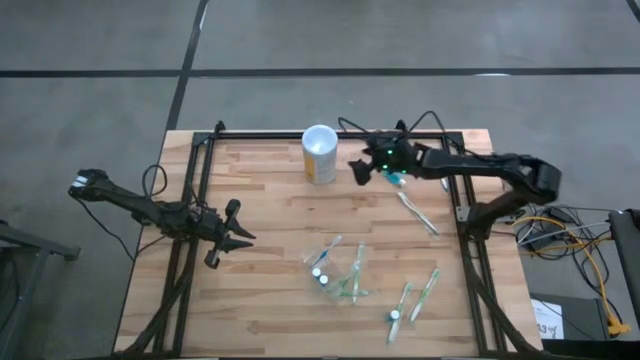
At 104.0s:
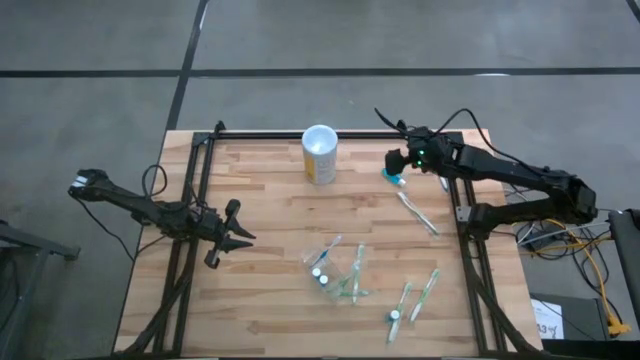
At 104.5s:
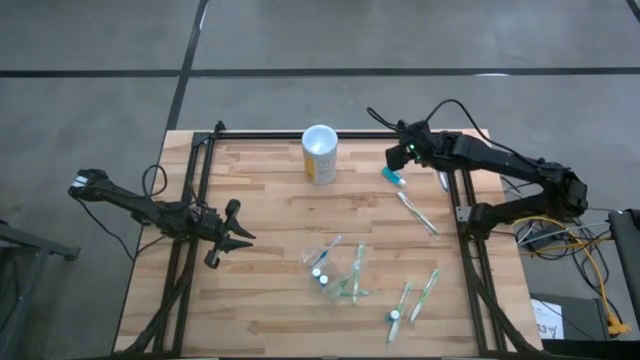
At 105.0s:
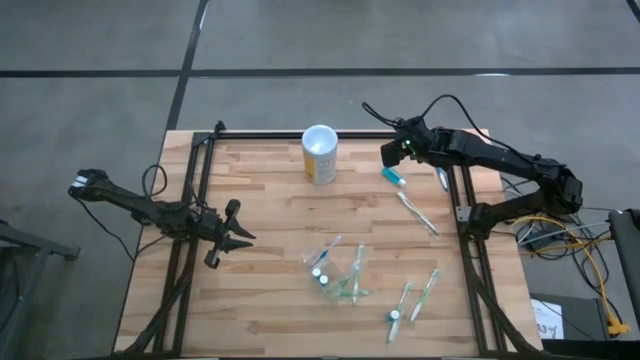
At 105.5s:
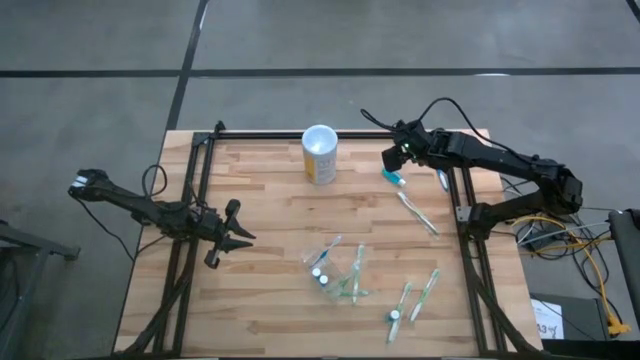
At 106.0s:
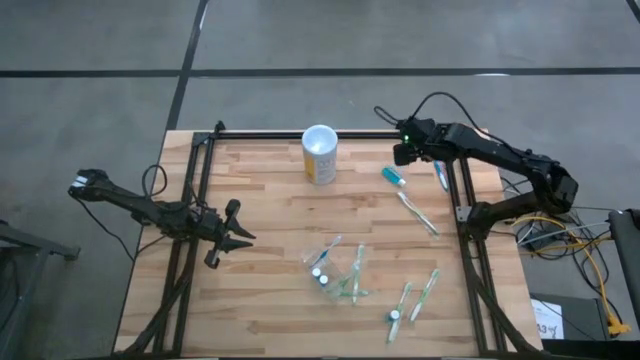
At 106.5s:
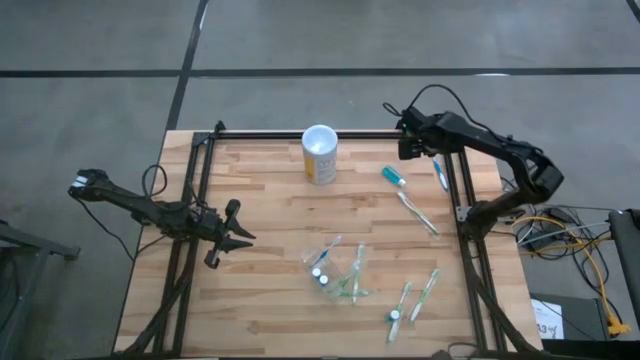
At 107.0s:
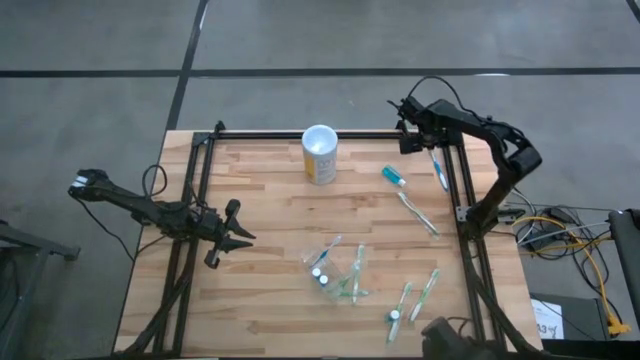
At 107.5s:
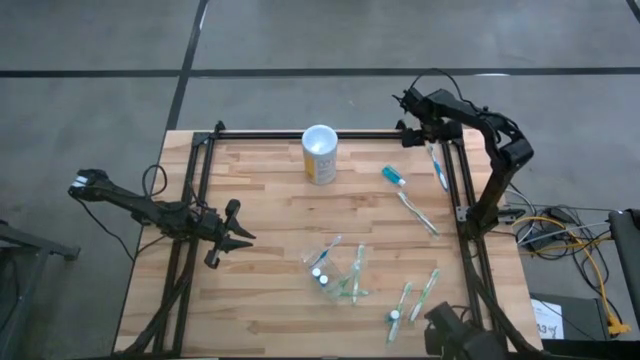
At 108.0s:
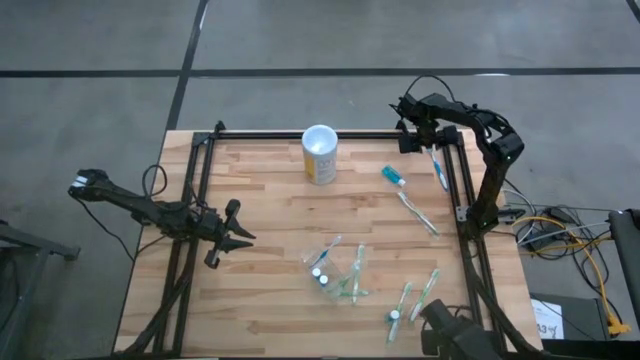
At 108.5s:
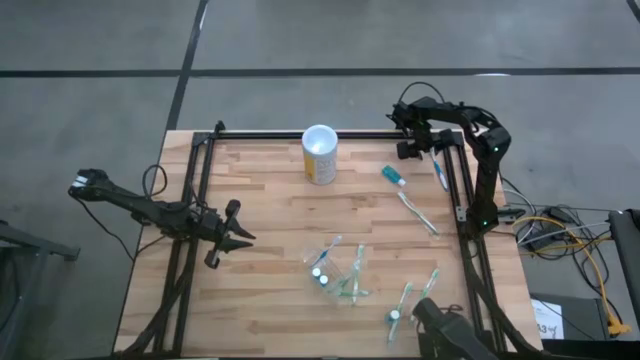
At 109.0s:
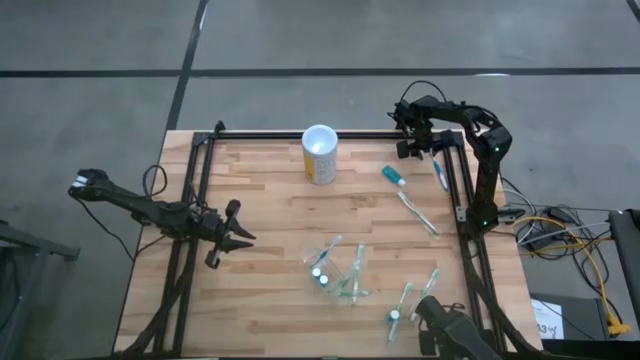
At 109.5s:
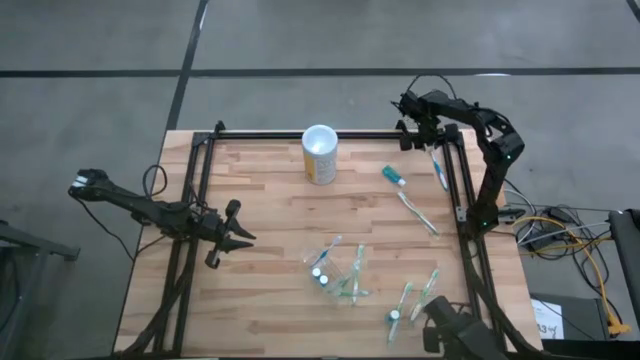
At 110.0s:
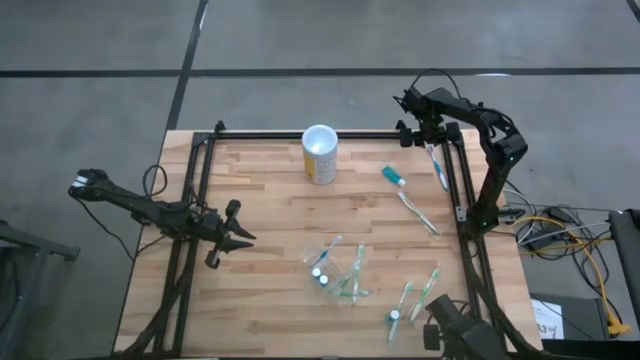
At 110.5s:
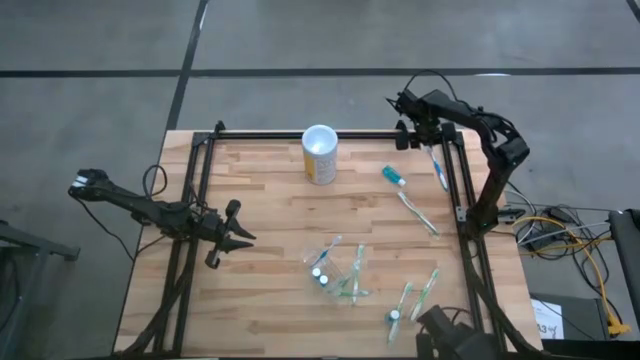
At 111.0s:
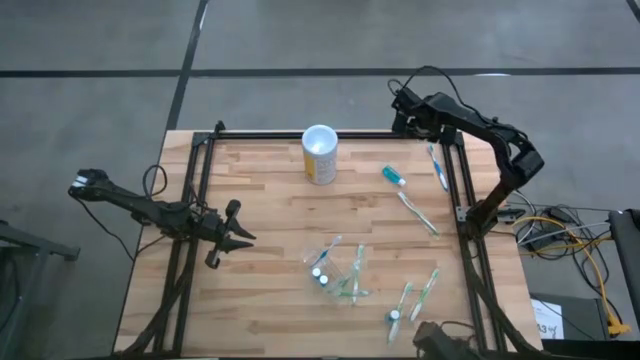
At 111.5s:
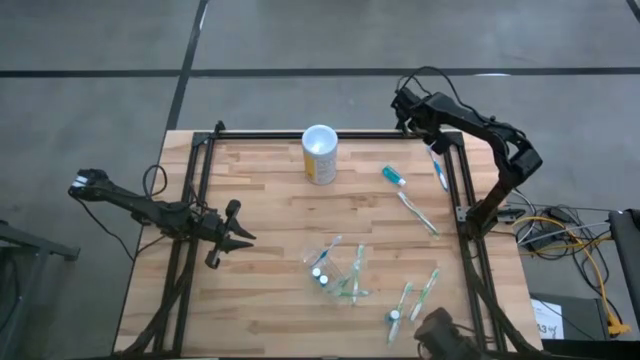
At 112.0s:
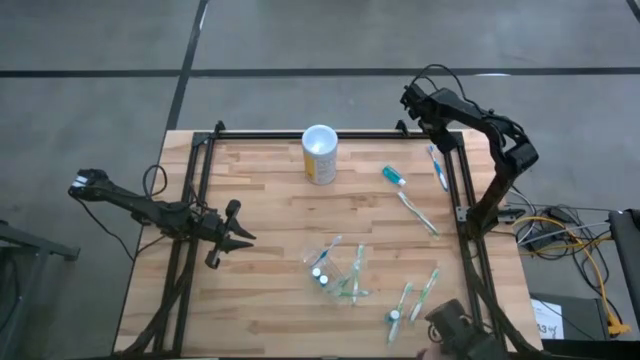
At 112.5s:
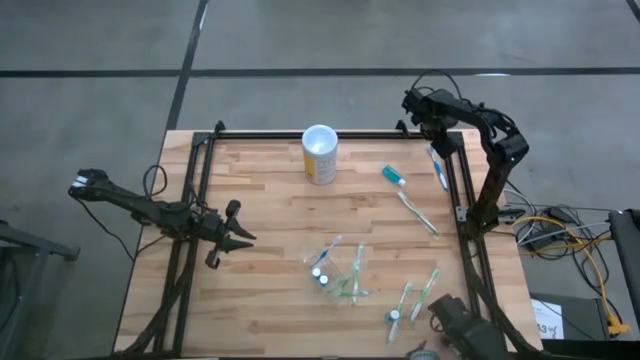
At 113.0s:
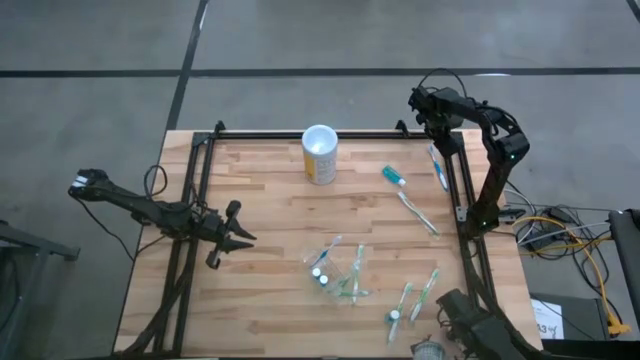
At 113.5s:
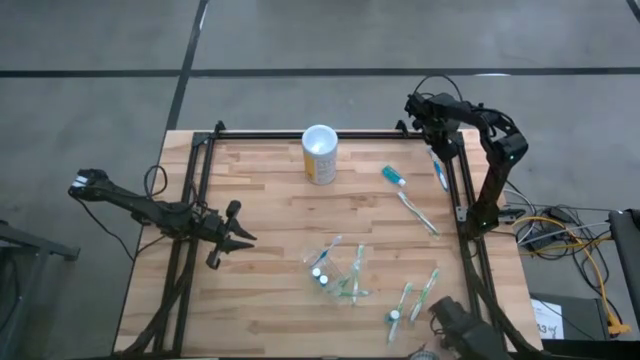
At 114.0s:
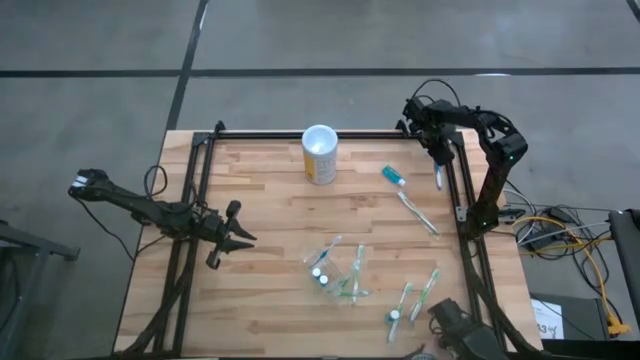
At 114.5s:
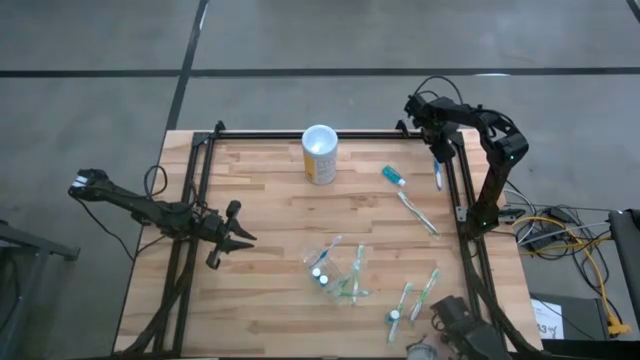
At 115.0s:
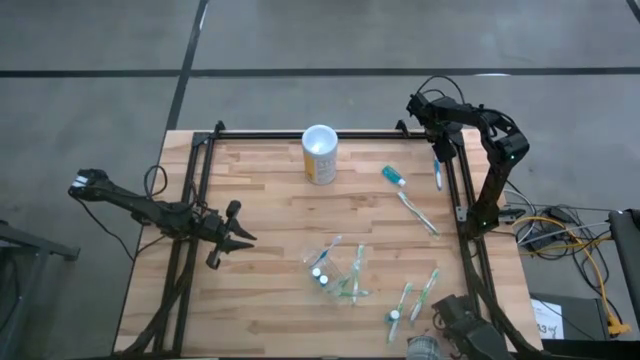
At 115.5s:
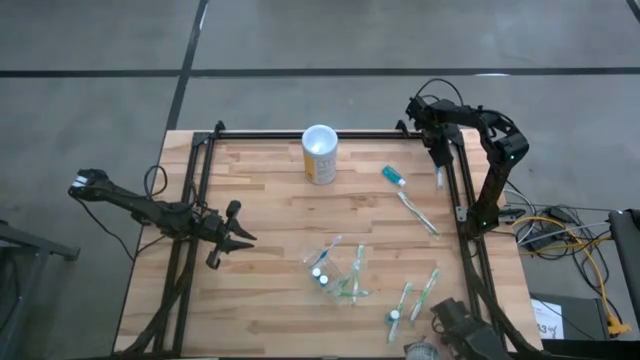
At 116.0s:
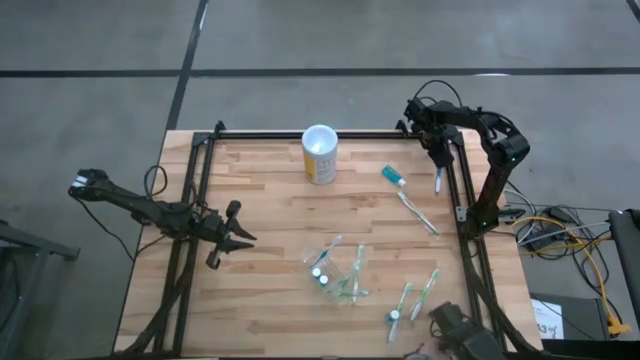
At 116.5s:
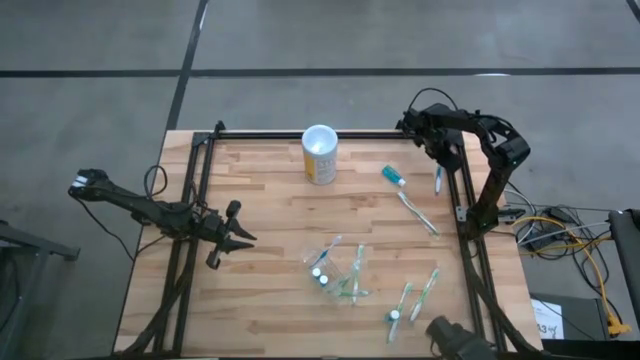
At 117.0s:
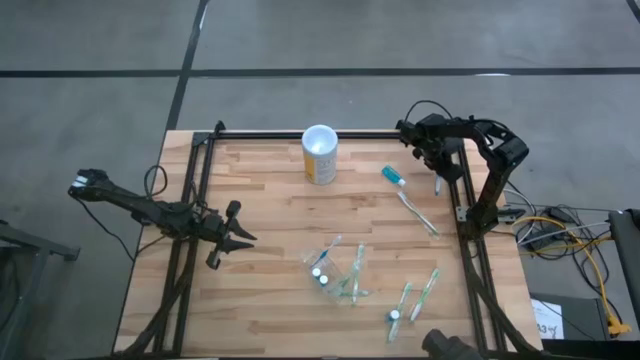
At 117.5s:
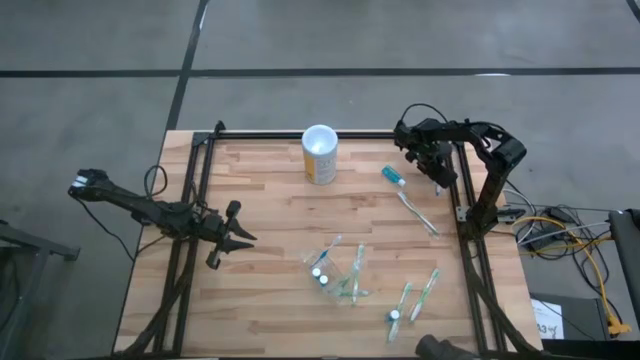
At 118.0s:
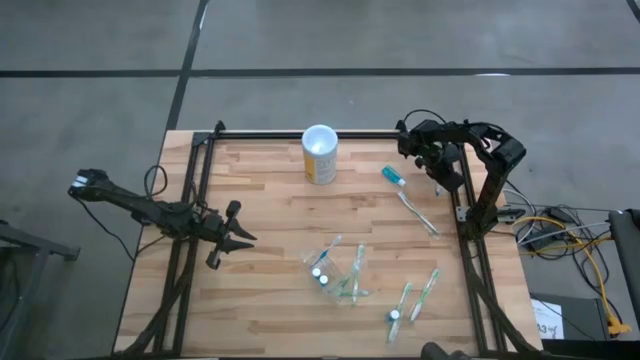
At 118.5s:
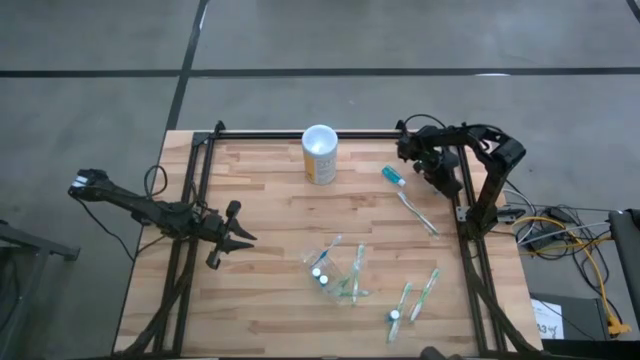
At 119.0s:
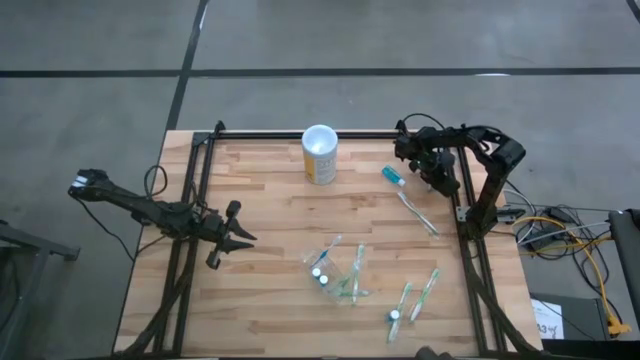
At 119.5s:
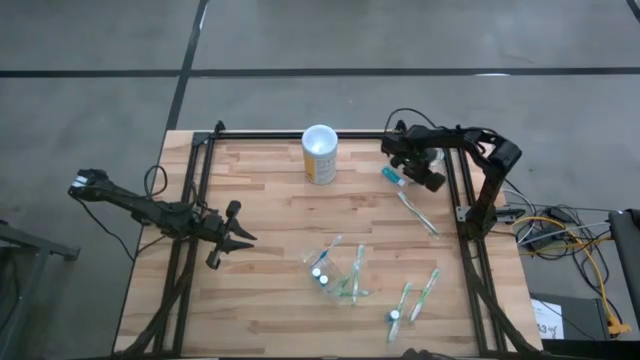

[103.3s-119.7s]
Task: Pick & Place toothbrushing station
Put the blue toothbrush into the left section of the transparent organizer

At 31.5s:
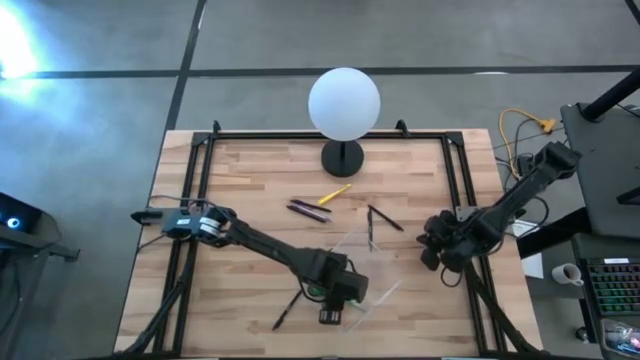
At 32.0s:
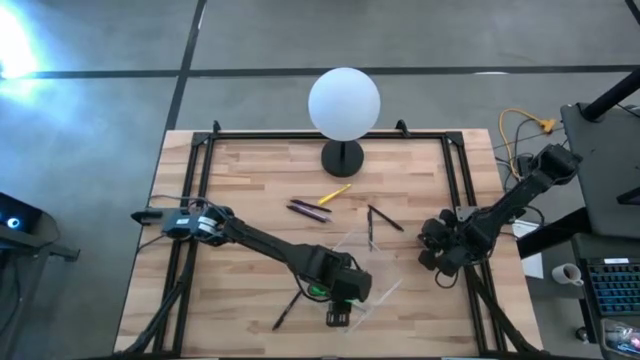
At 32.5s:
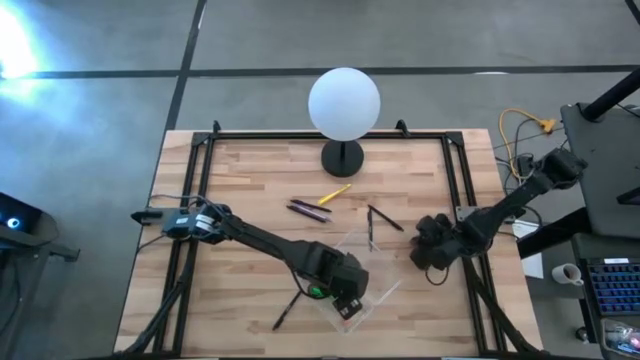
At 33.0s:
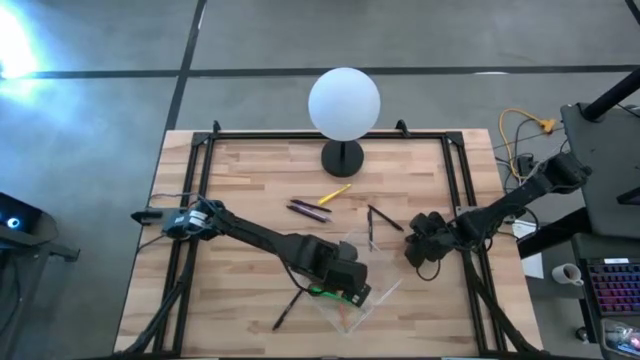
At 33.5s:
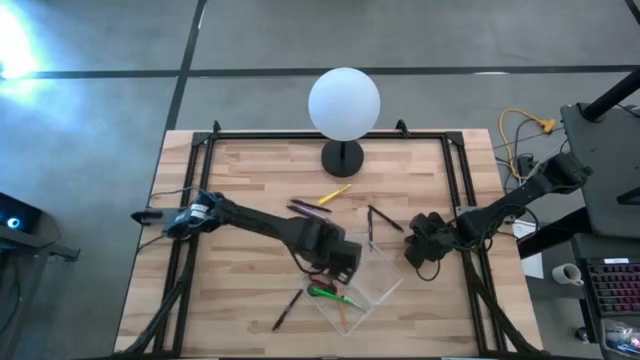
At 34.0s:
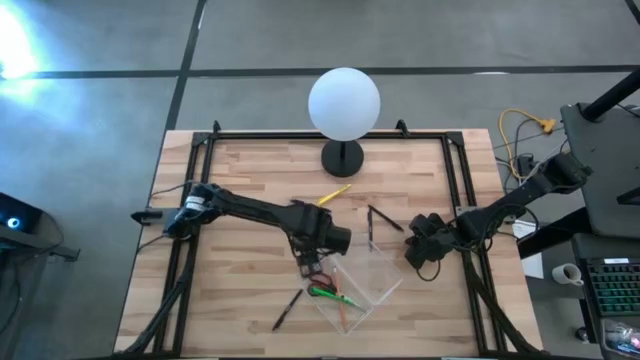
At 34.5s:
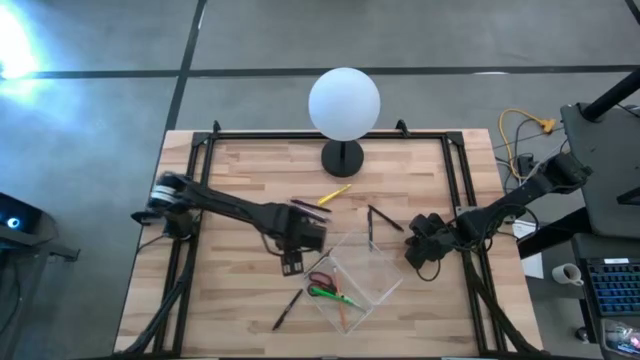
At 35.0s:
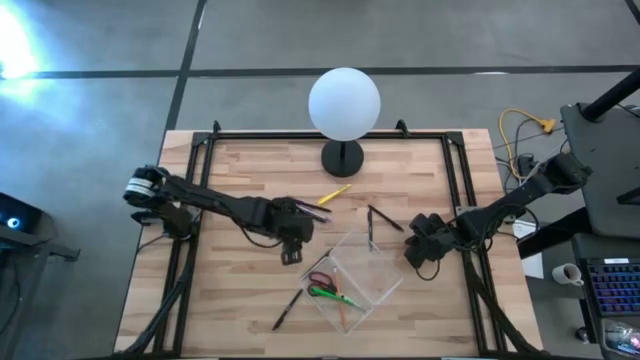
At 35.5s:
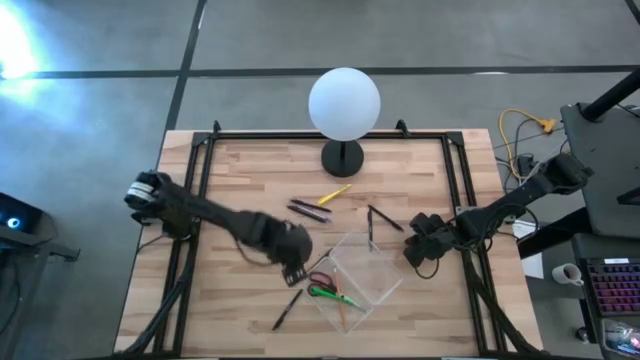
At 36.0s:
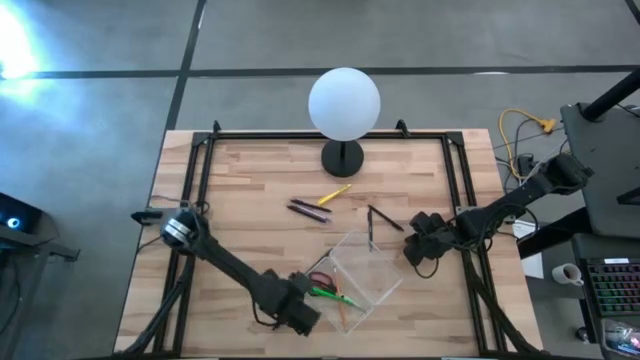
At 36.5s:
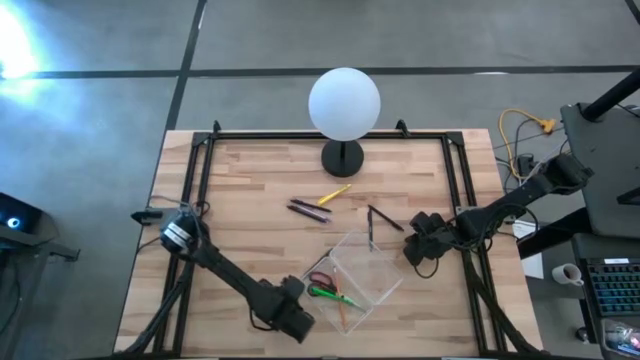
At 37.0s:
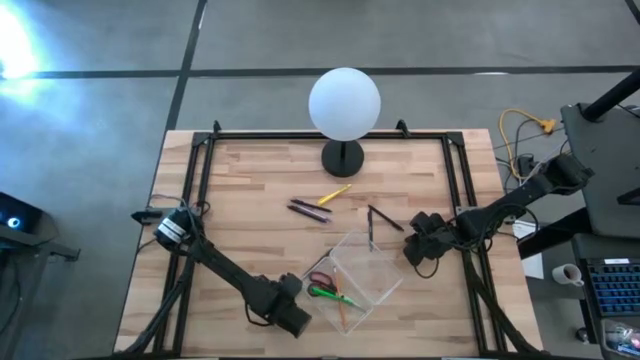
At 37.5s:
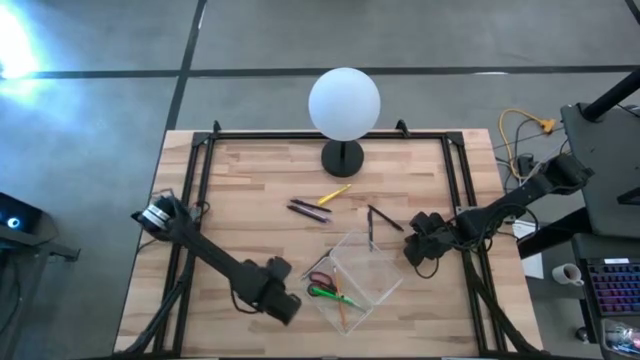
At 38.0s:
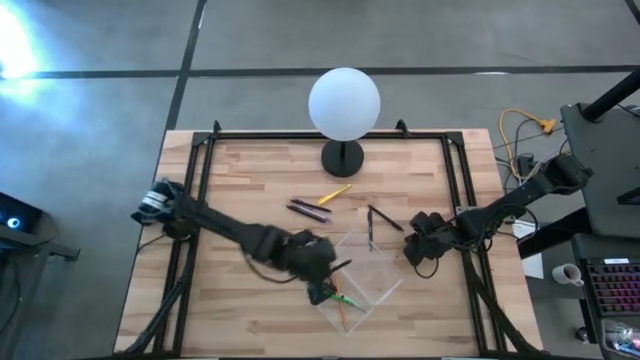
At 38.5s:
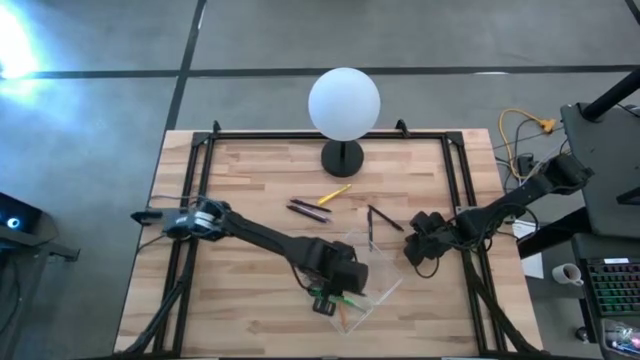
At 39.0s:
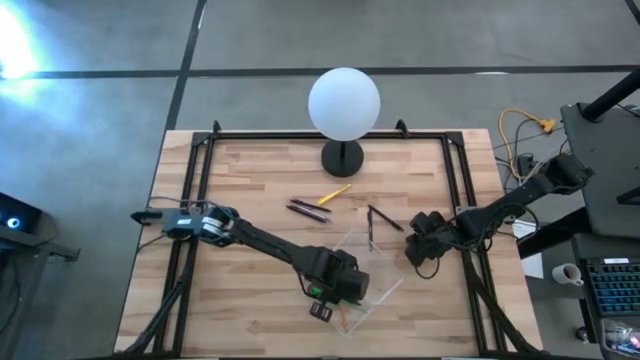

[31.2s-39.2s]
Task: Pick & place school supplies into a supply box
Put the black pen into the supply box
